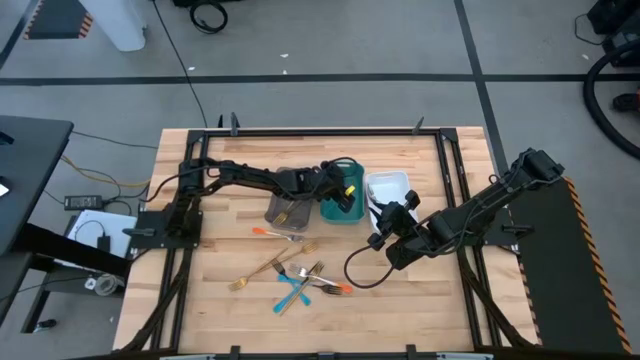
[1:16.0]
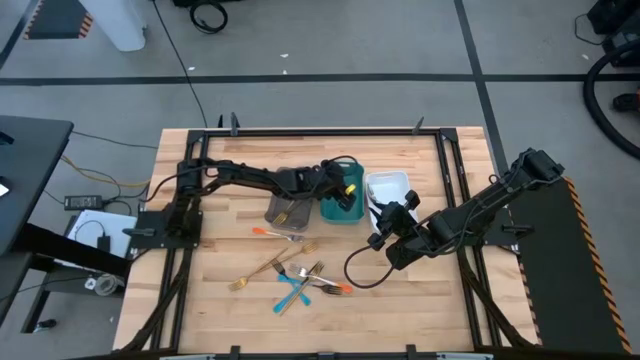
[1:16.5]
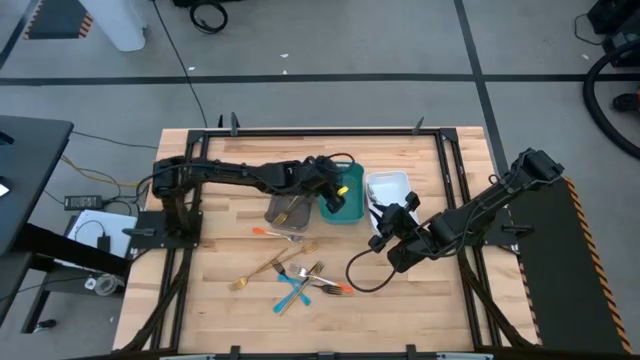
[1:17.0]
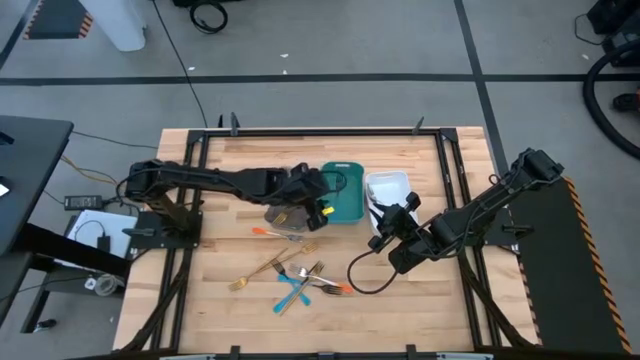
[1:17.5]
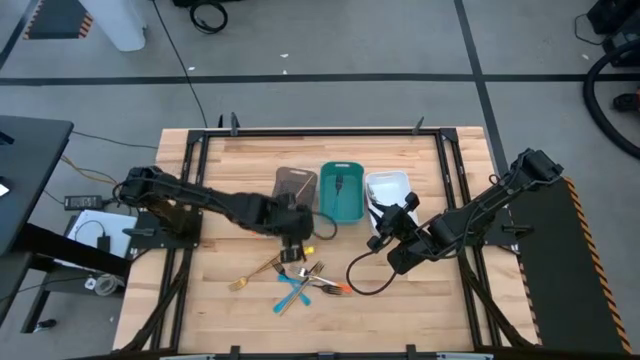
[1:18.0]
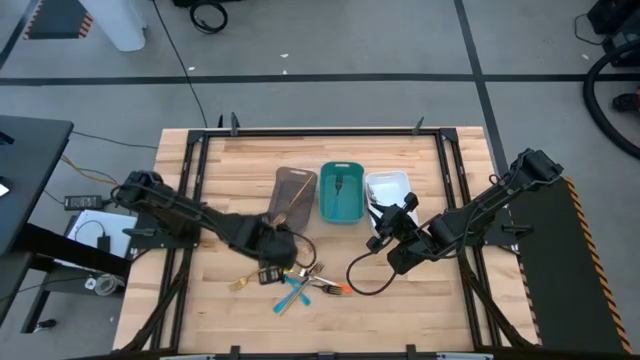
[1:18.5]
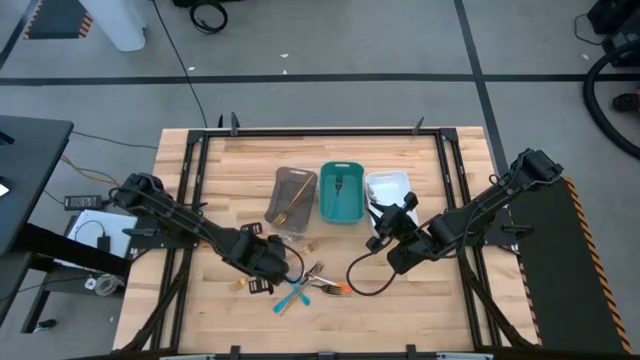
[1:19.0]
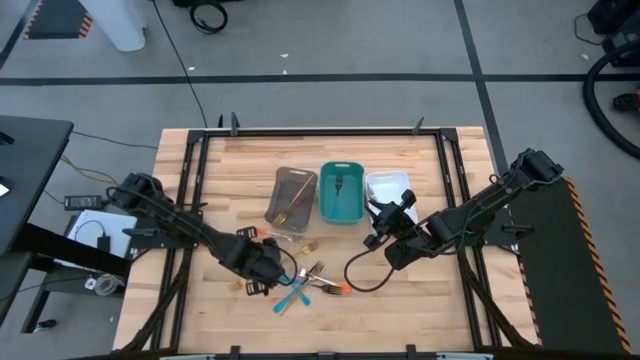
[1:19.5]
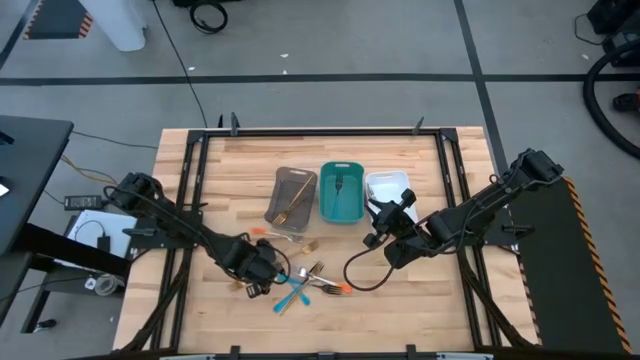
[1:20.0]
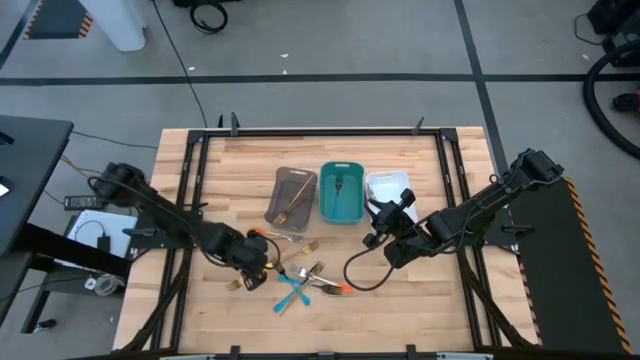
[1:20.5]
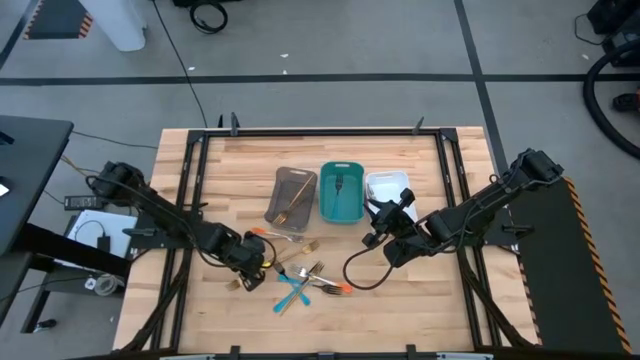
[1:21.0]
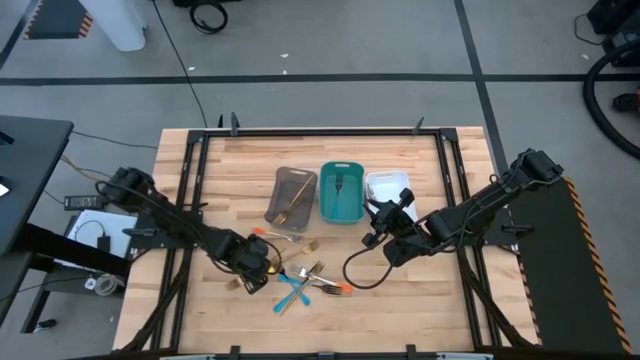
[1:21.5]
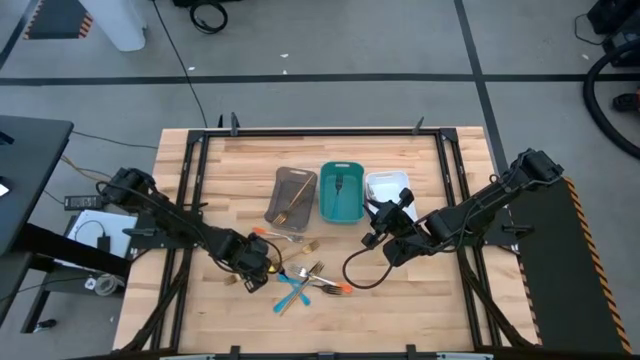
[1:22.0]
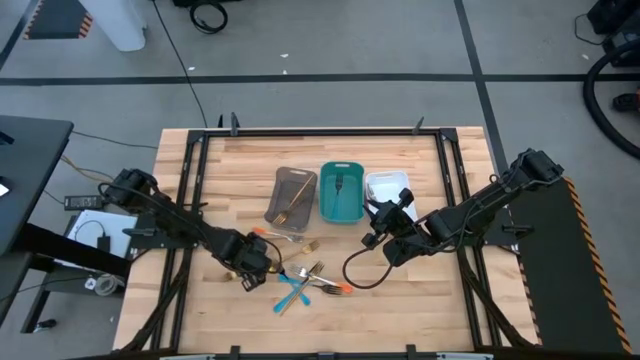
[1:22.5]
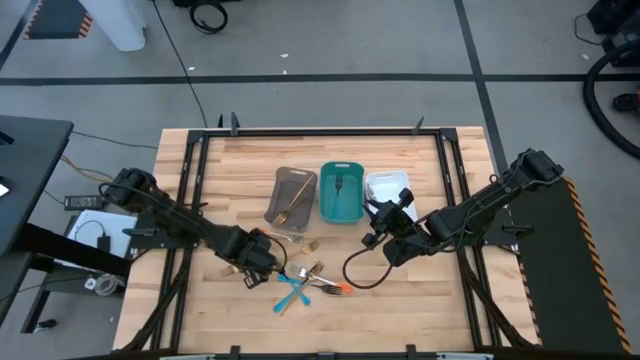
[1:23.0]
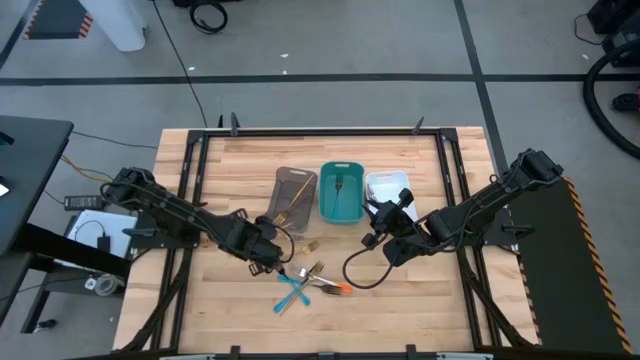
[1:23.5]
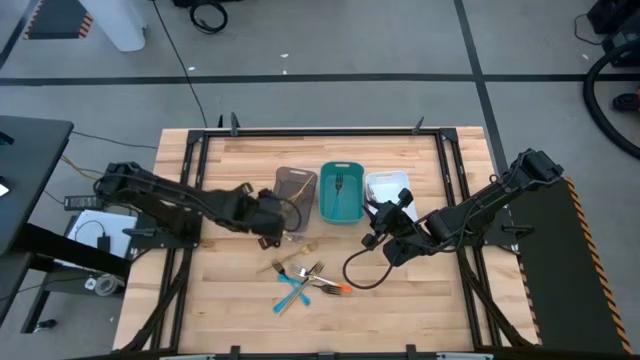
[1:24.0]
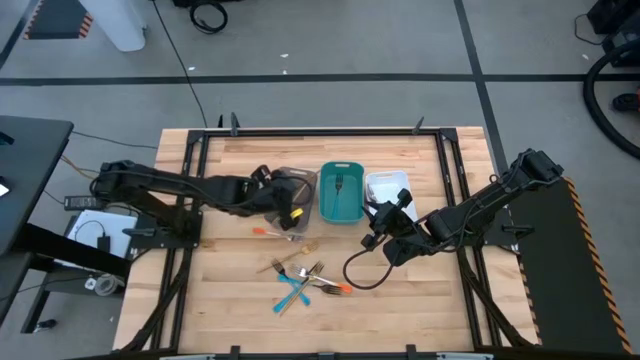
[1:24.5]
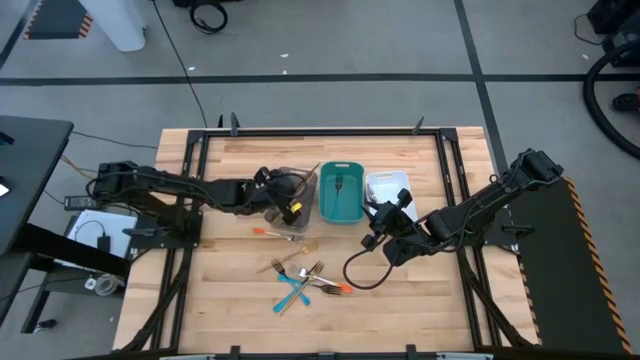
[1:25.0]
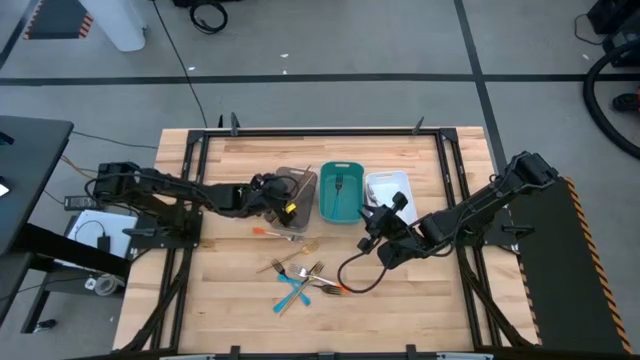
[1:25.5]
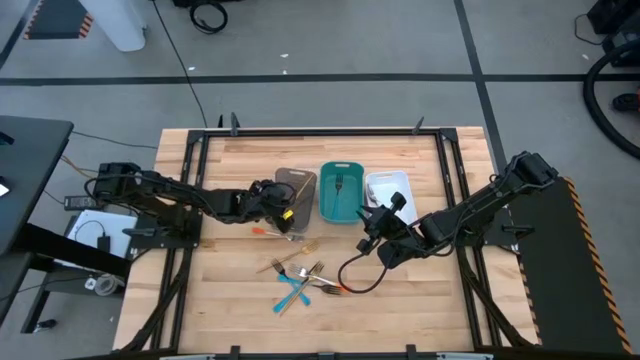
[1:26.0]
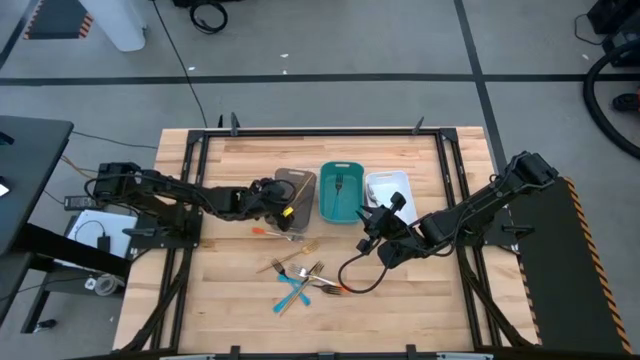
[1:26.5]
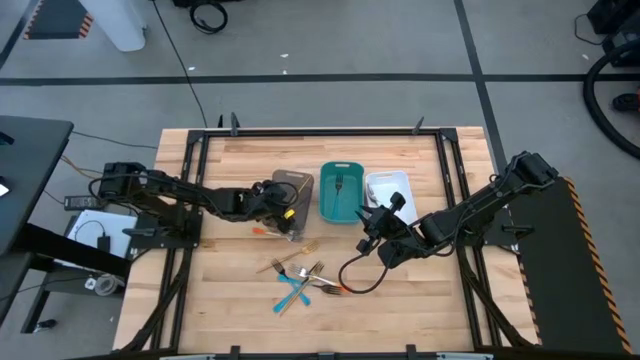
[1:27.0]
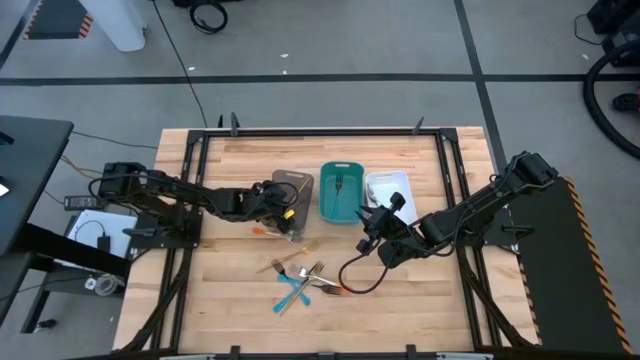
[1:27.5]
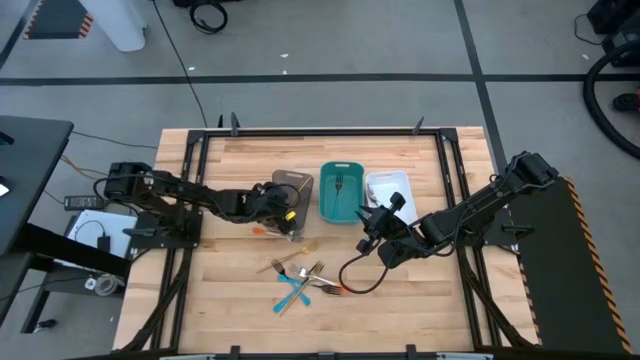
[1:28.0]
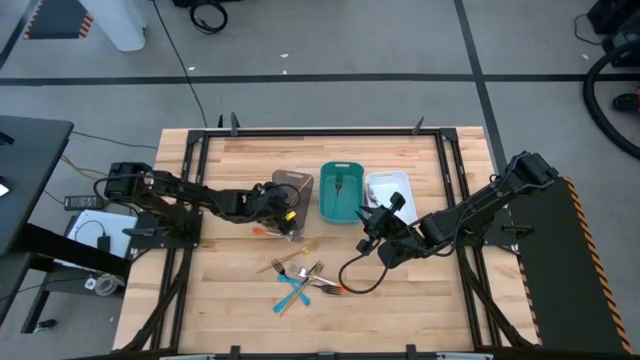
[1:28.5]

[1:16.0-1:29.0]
Task: Sort silverware by color (type)
Put the gold fork into the black bin

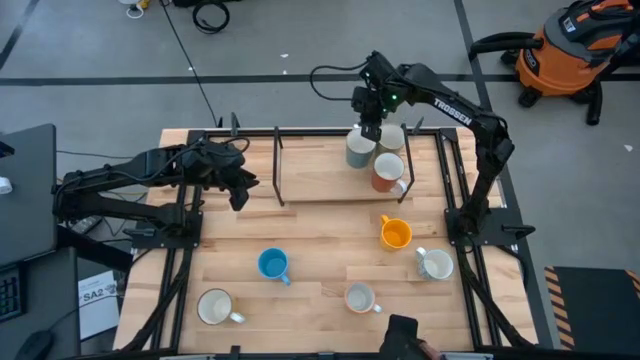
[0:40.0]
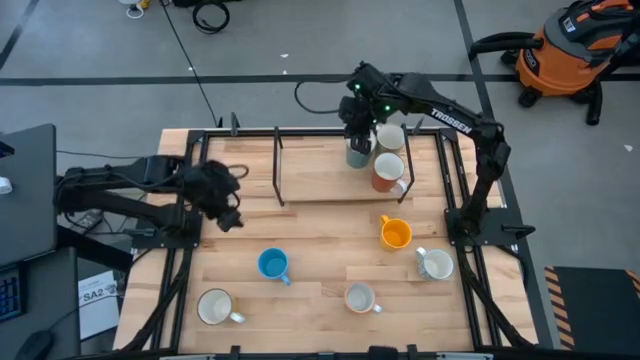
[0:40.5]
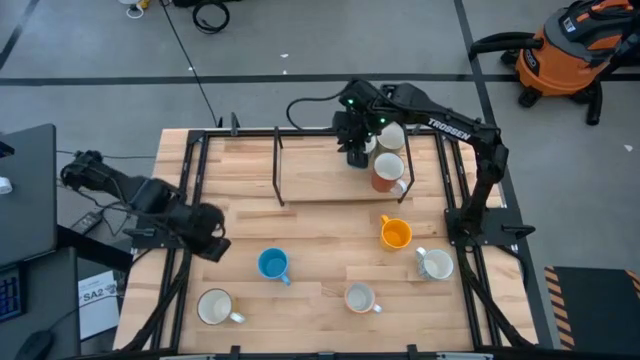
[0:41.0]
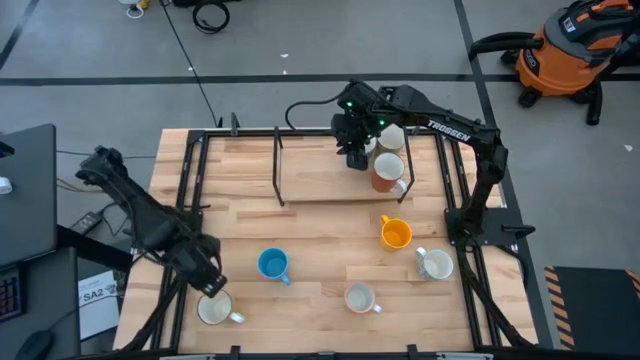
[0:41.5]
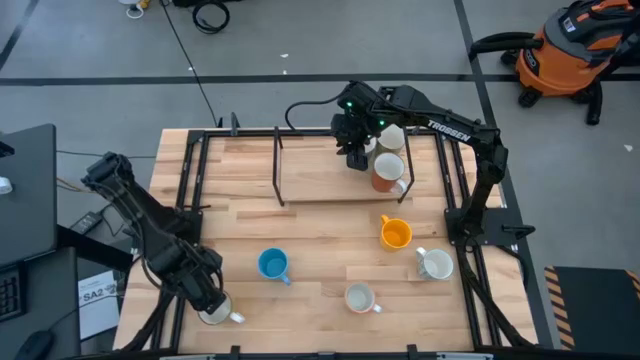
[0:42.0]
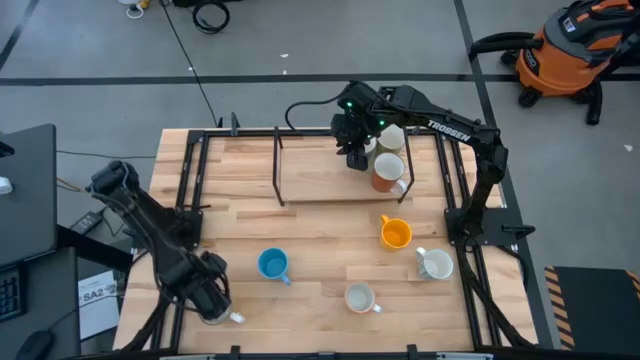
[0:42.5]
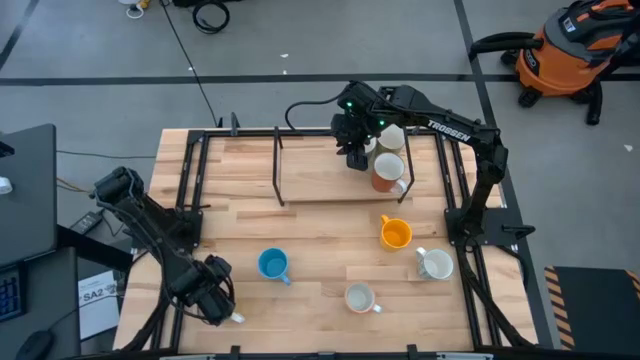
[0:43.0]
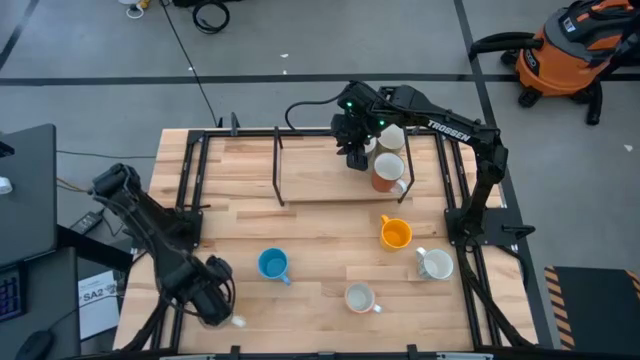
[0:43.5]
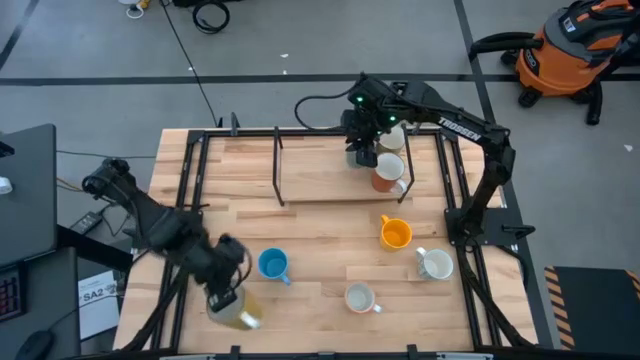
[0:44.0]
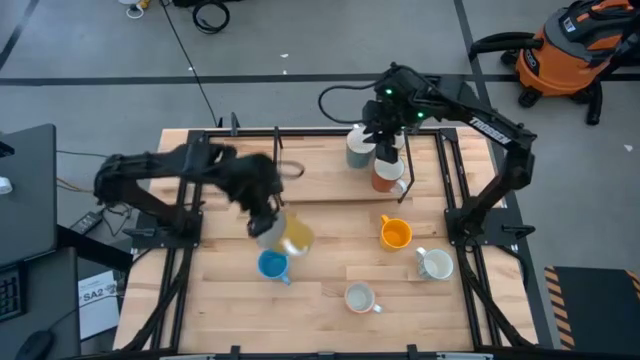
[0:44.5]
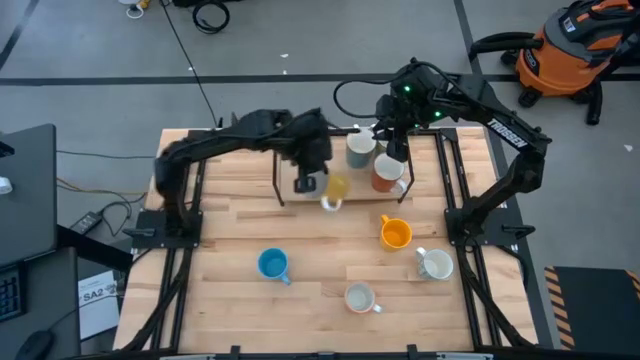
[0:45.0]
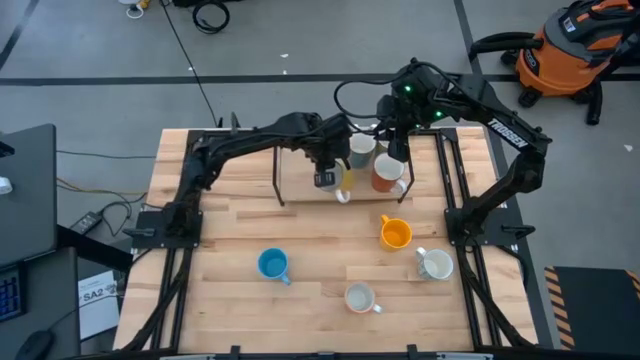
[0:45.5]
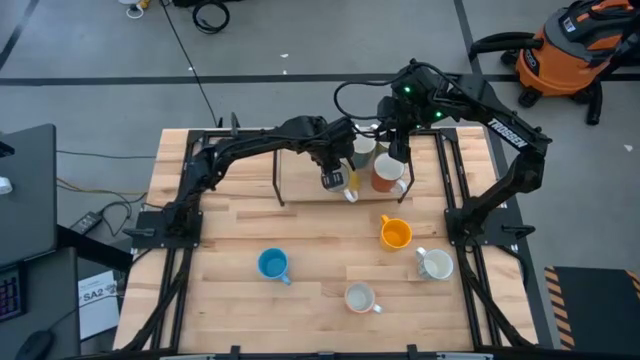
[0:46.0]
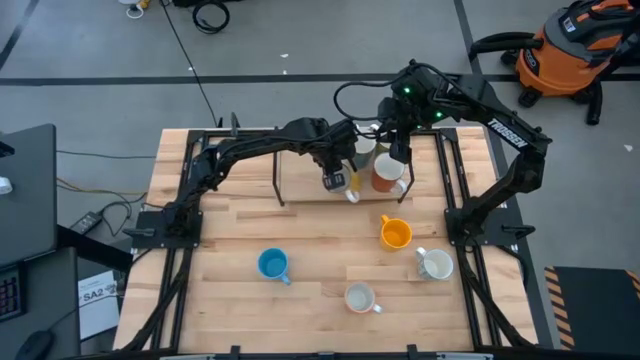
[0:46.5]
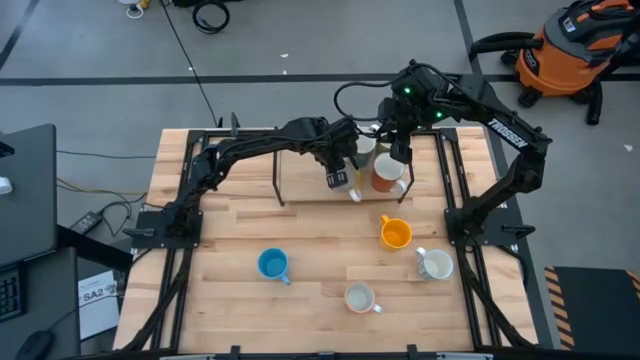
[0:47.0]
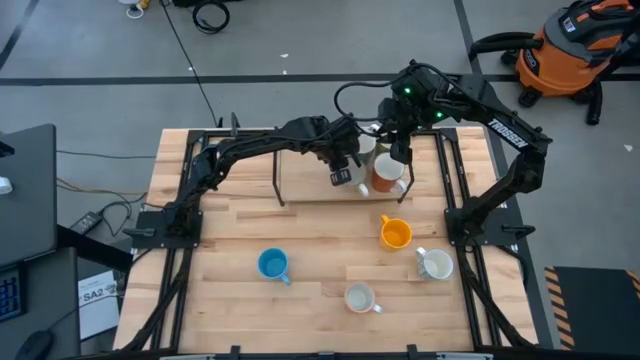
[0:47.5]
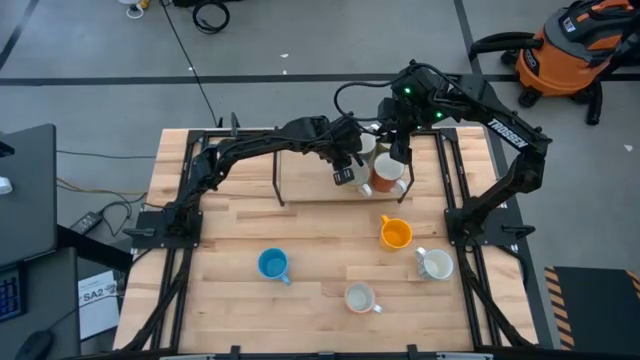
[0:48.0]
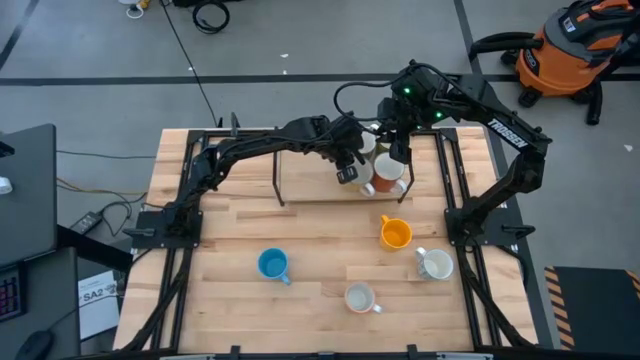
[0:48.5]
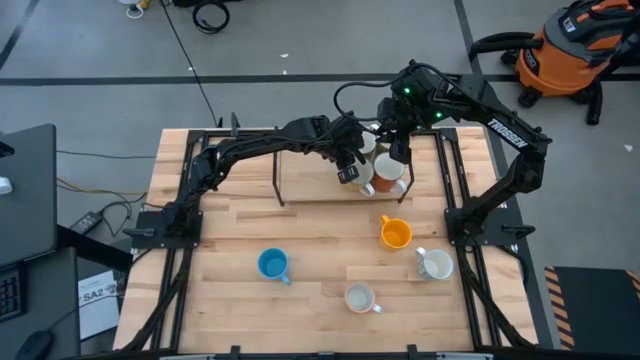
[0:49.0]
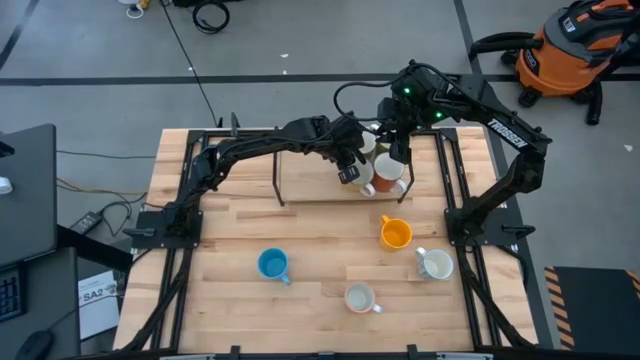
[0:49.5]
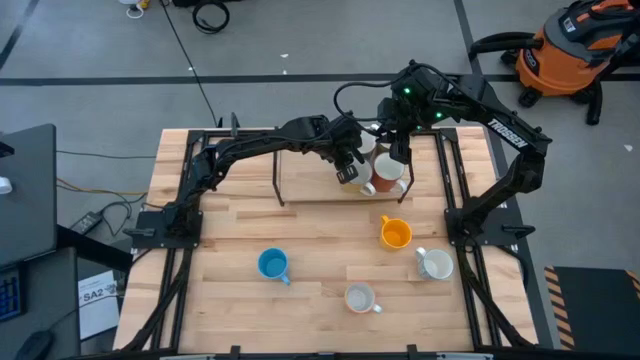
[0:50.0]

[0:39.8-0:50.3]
Task: Place coffee mugs
Put the light yellow cup on the shelf aligned with the light blue cup
